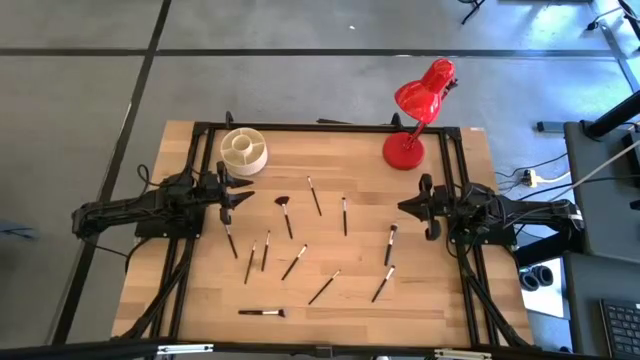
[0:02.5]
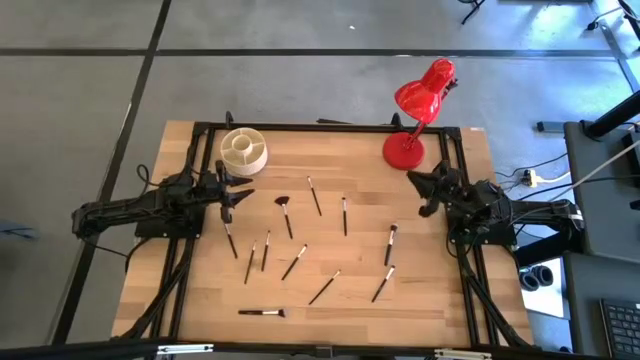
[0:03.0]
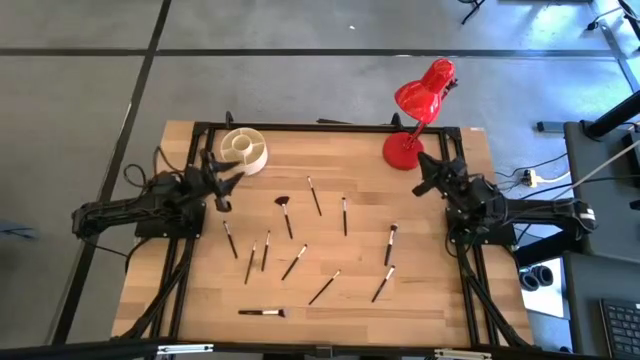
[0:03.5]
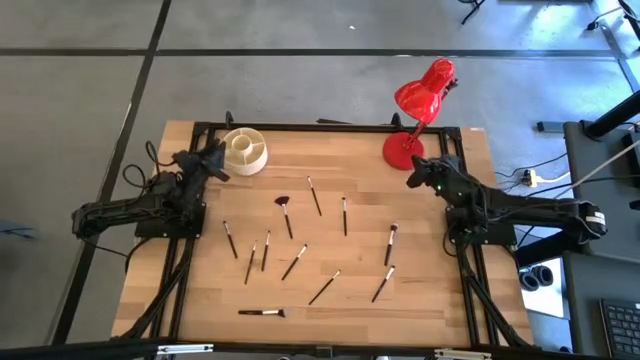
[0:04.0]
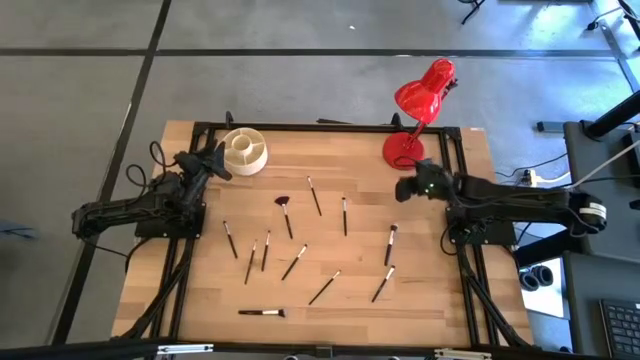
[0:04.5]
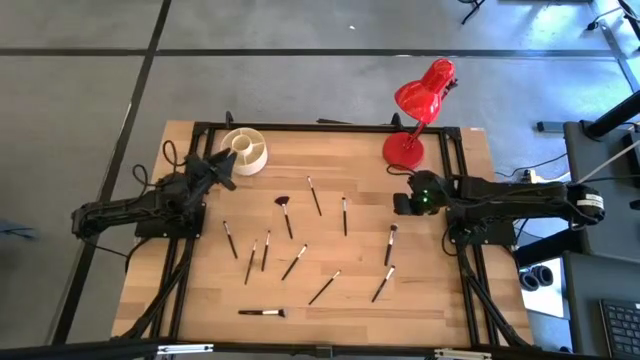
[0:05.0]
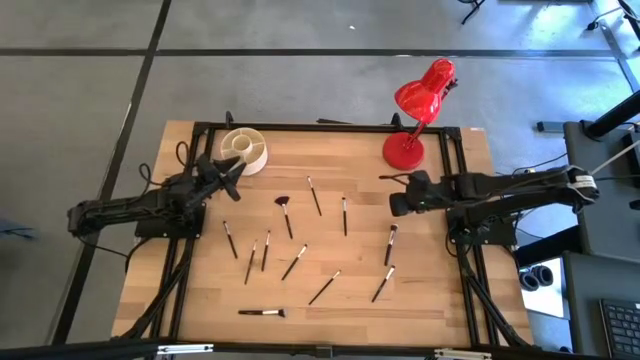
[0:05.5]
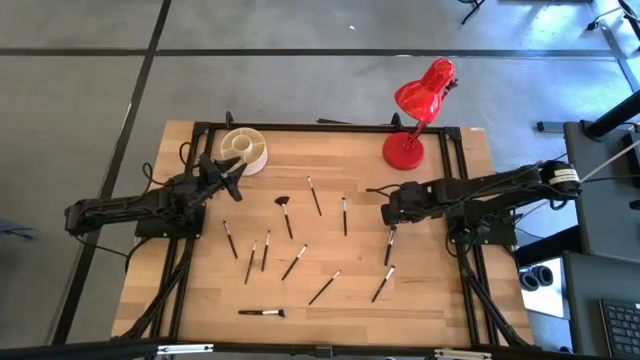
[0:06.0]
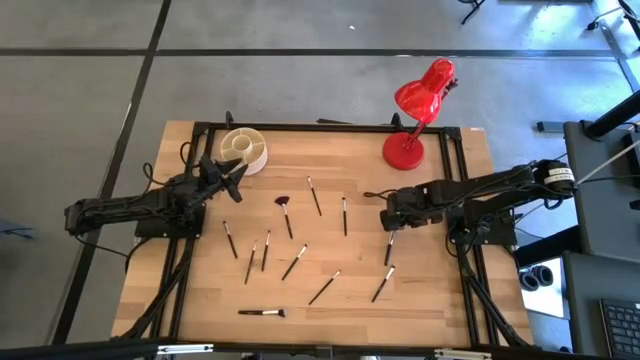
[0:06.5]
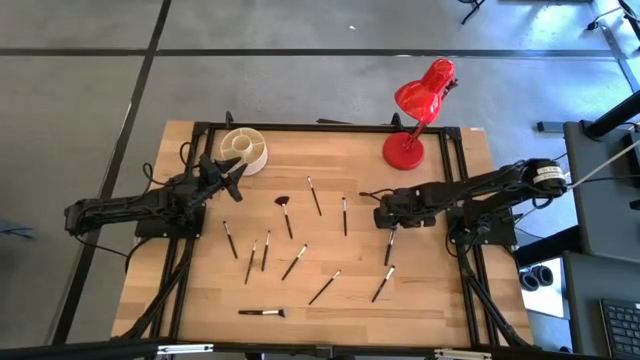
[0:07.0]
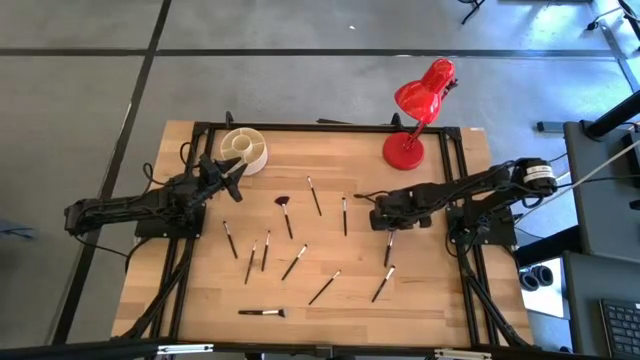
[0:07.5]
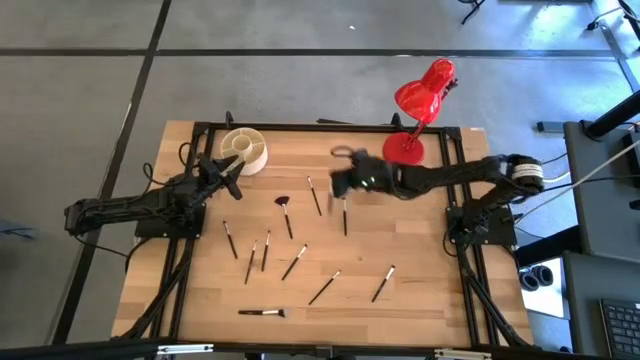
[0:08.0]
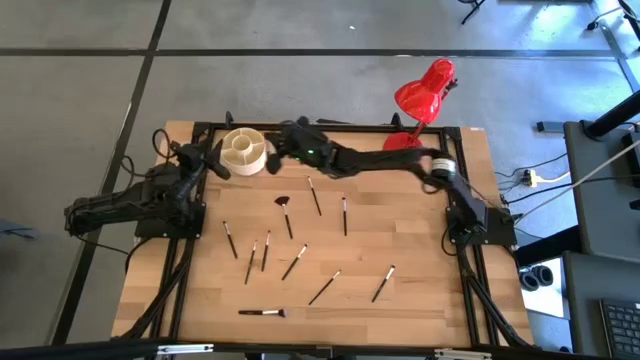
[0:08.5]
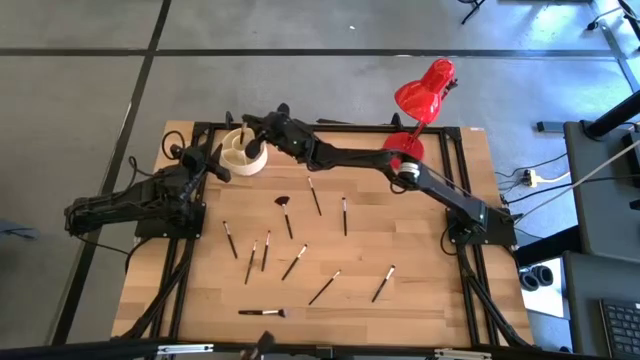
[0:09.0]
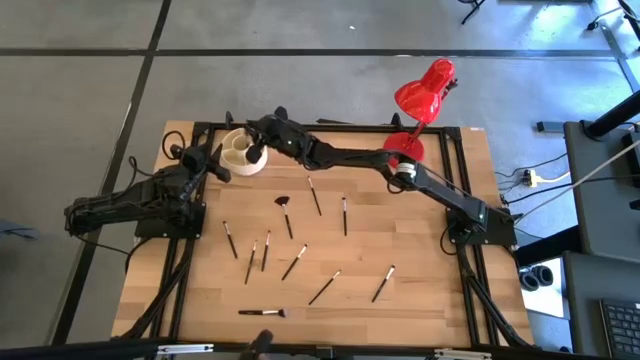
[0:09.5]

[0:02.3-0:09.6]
Task: Put items in baskets/containers
Put the black powder brush into the white organizer

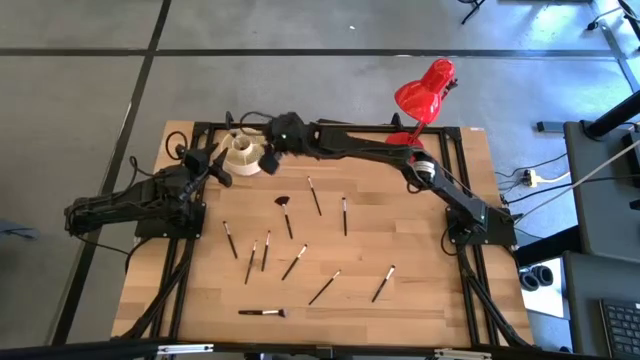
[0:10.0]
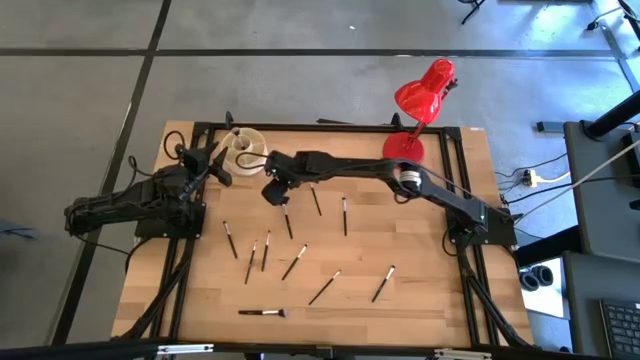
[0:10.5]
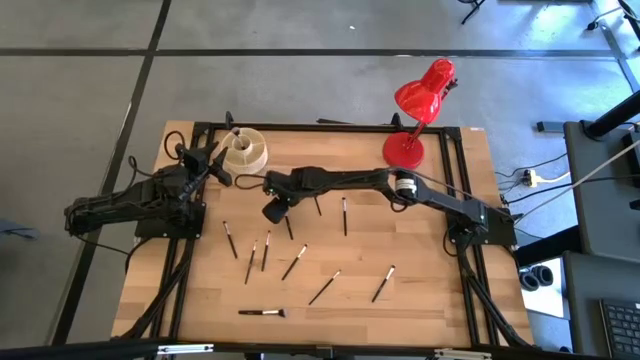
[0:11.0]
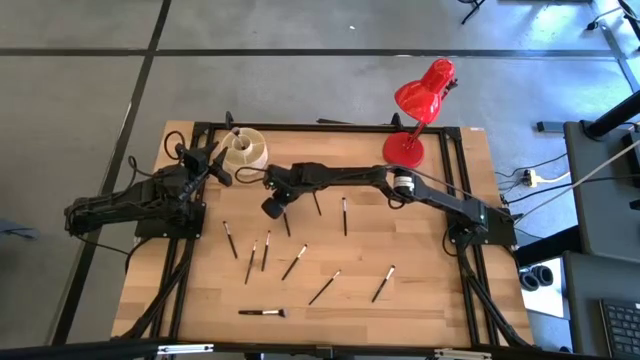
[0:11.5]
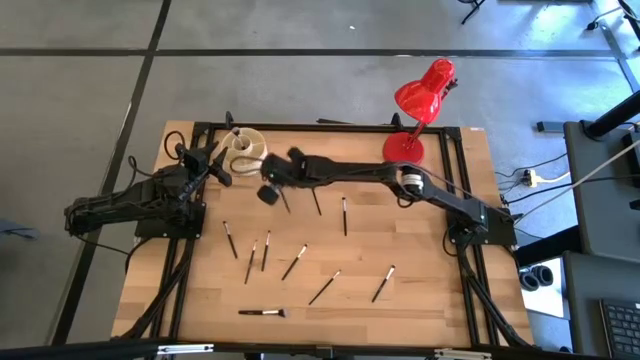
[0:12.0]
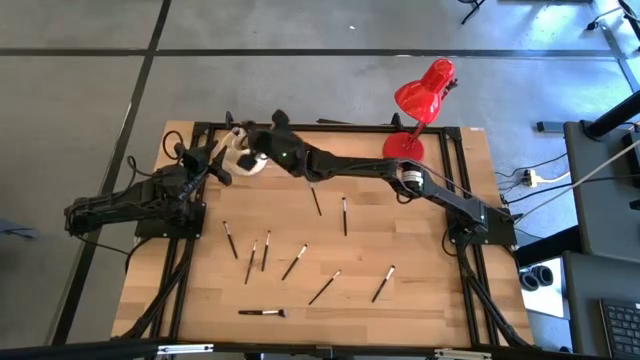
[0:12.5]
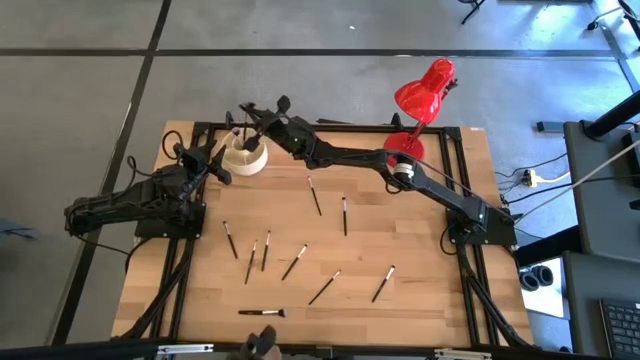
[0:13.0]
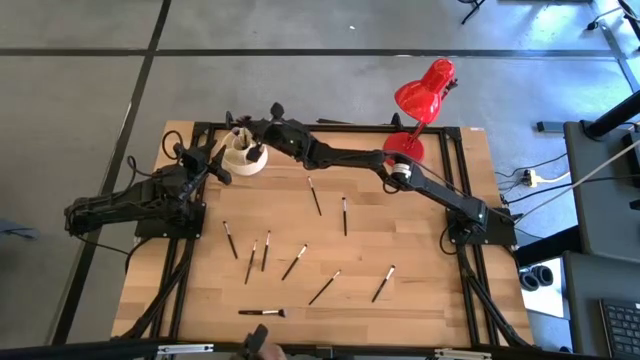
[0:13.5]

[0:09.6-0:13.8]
Put the black highlighter brush into the white organizer

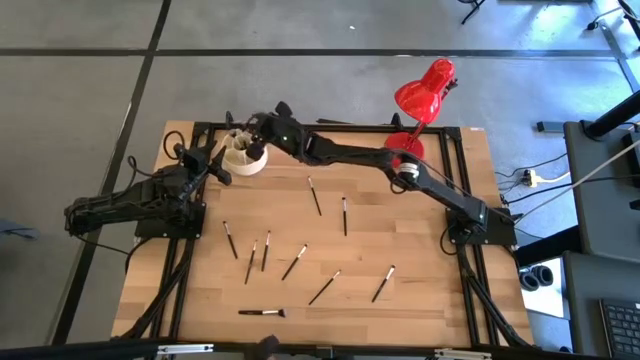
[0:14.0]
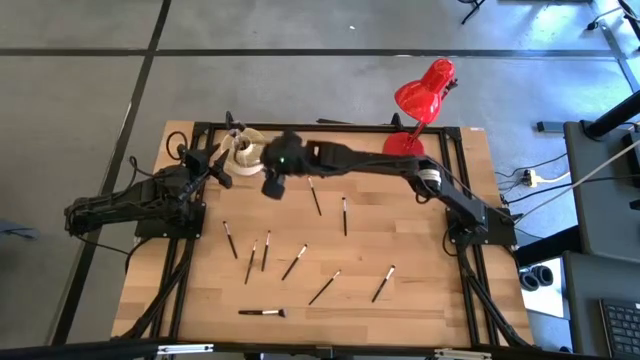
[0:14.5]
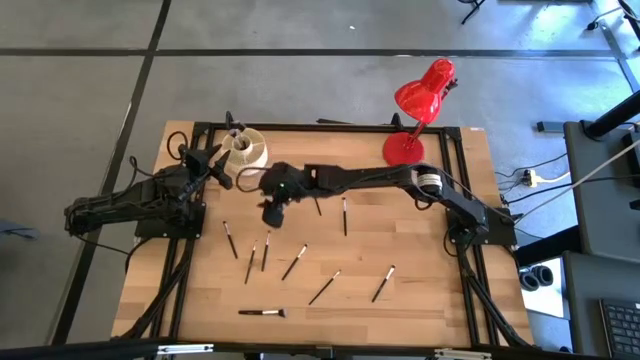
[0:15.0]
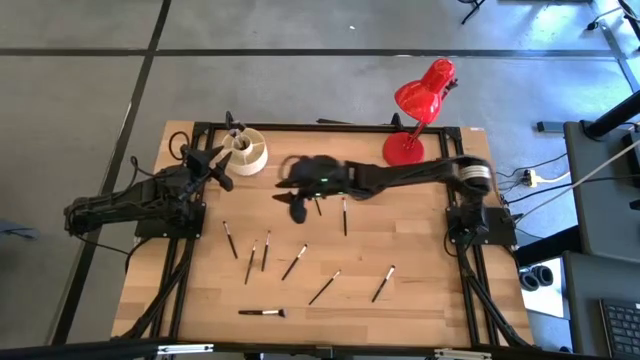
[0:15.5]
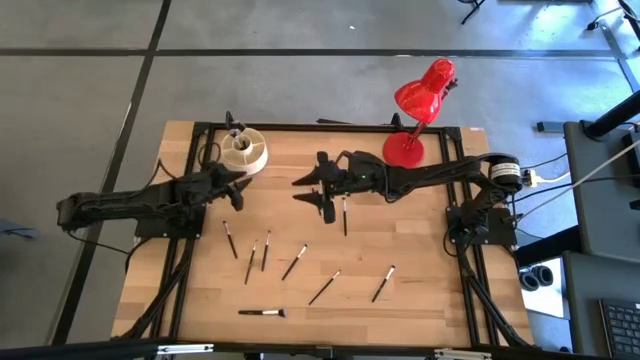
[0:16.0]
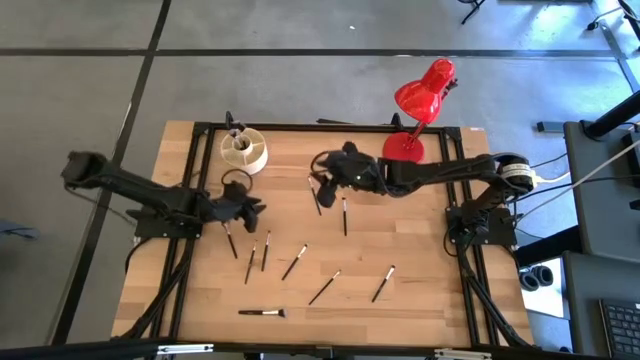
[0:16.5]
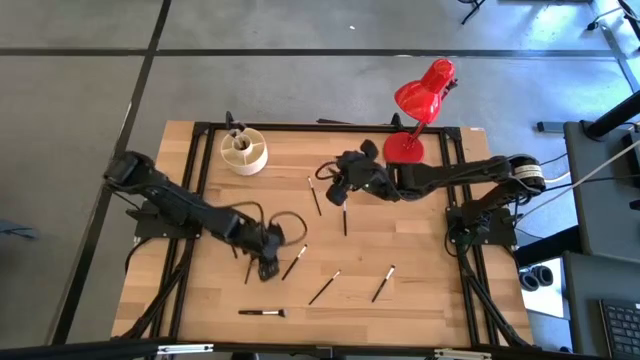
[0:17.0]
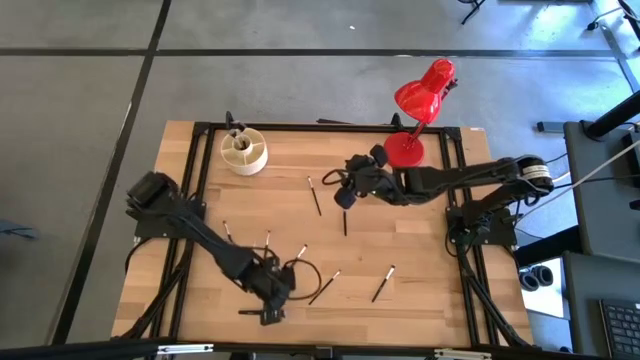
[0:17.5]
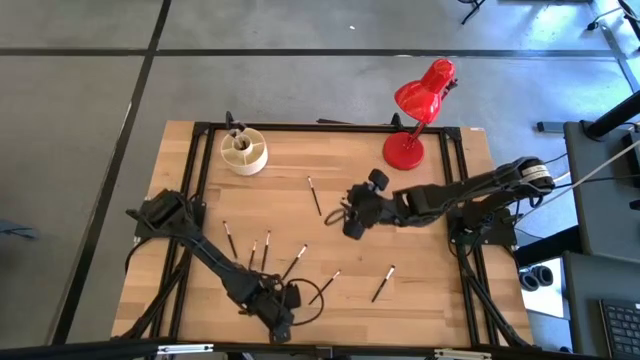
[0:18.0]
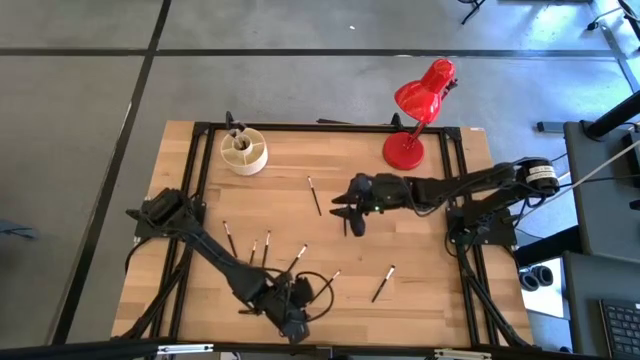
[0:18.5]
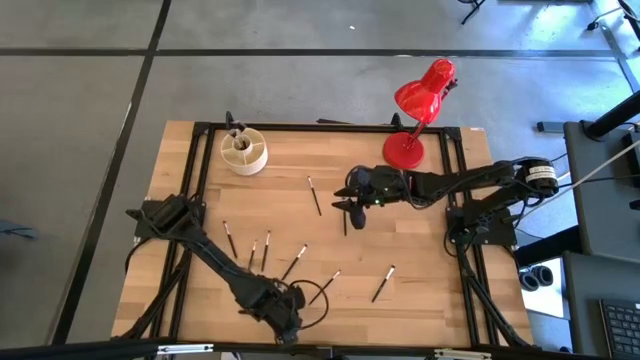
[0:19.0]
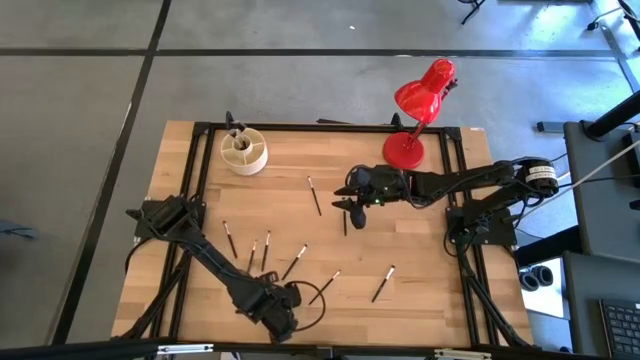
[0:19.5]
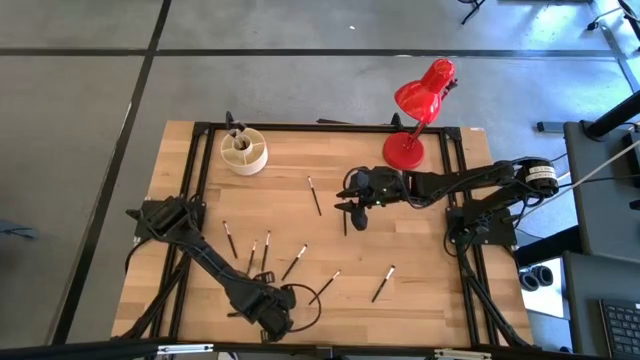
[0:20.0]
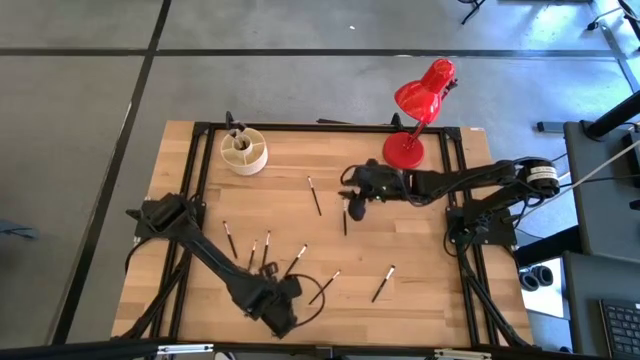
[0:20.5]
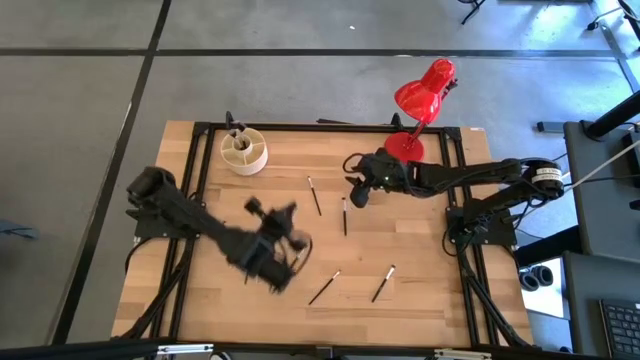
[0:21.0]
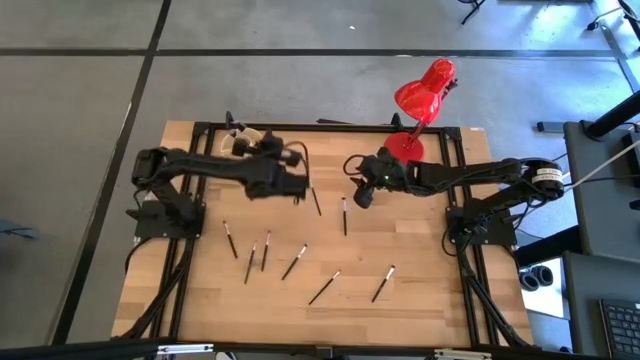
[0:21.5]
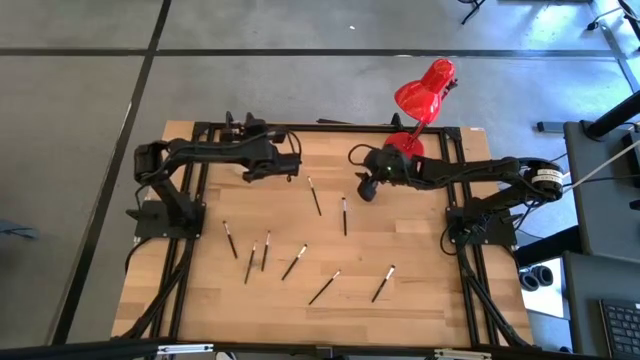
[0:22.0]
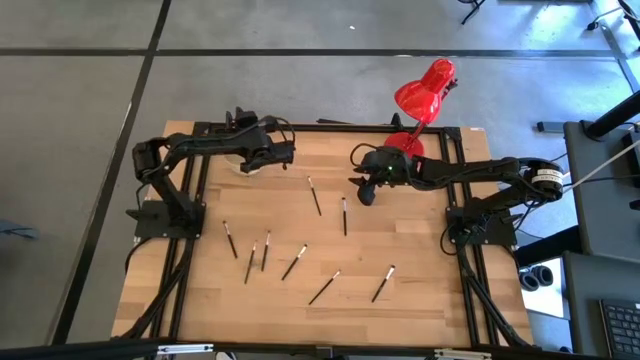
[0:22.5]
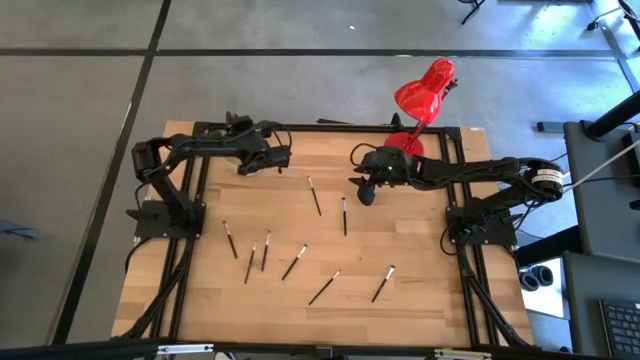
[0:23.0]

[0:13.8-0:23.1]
Put the black powder brush into the white organizer

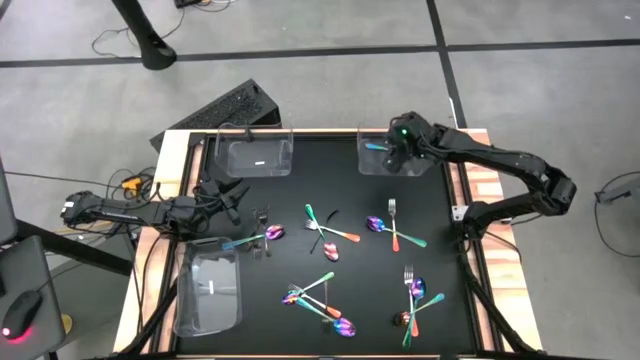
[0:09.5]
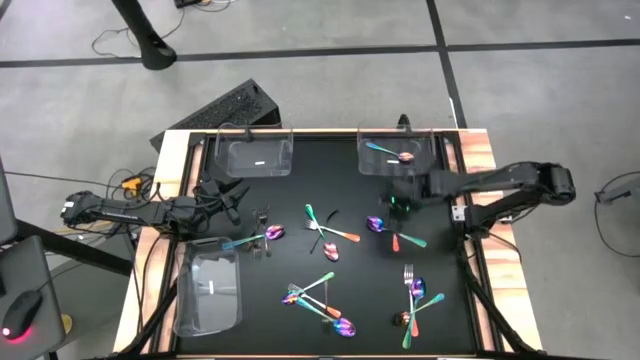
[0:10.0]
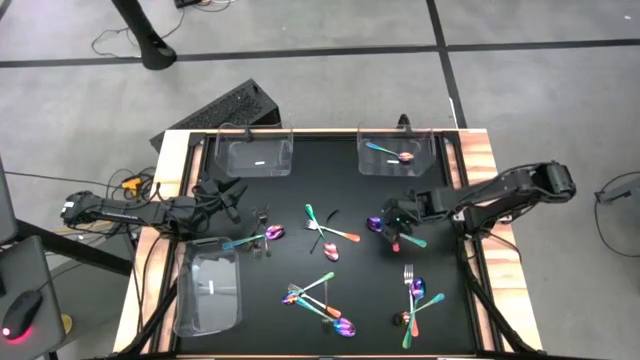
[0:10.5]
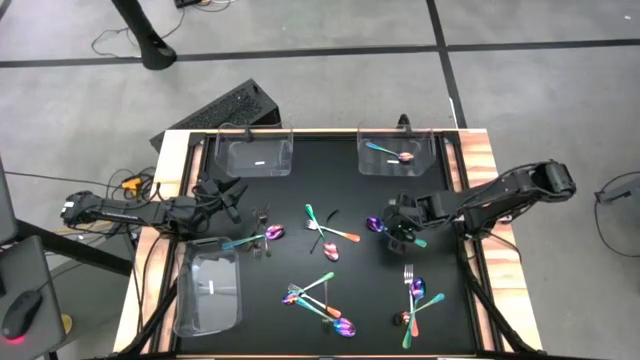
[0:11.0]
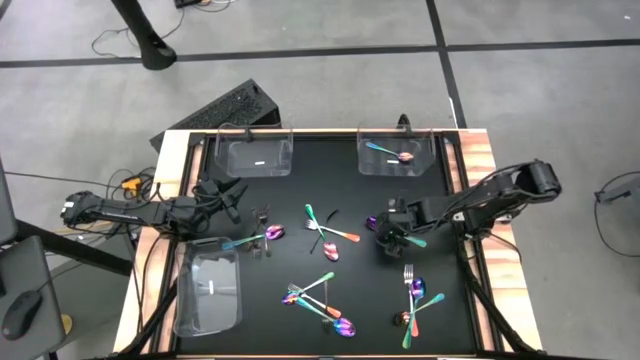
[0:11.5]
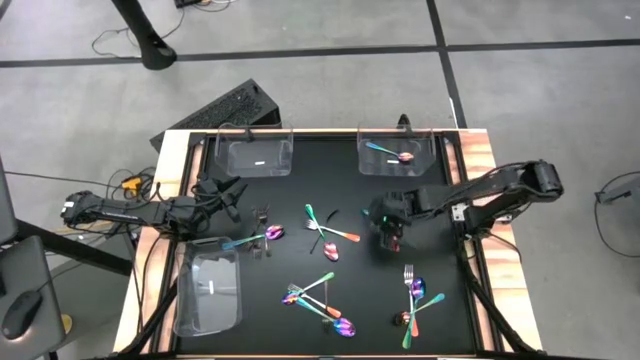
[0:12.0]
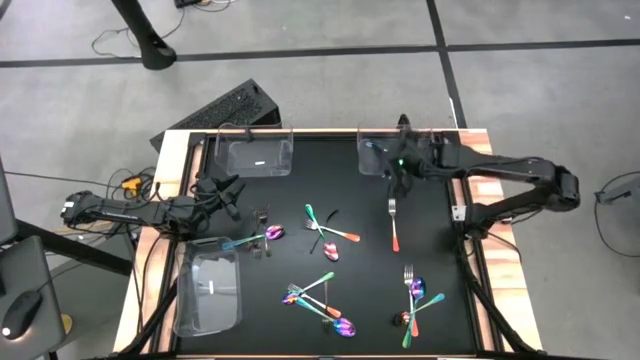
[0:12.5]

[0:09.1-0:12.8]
Task: Sort silverware by color (type)
Put the blue spoon into top right transparent bin
